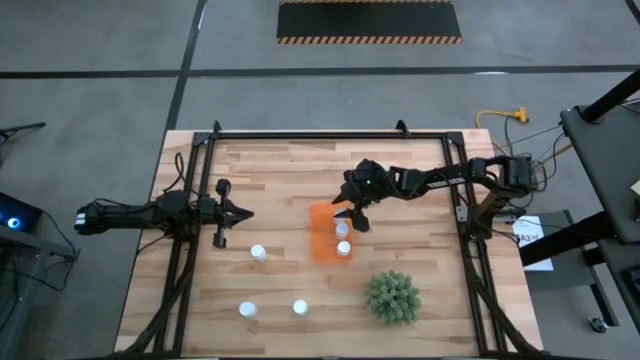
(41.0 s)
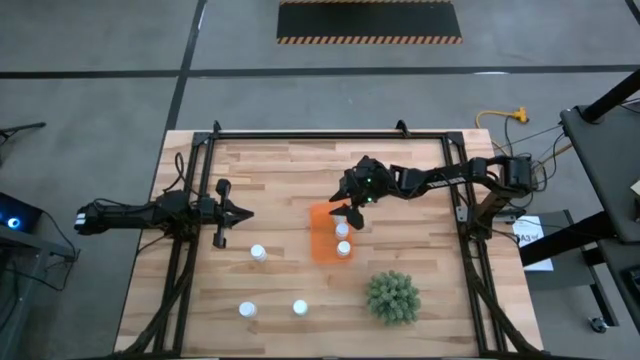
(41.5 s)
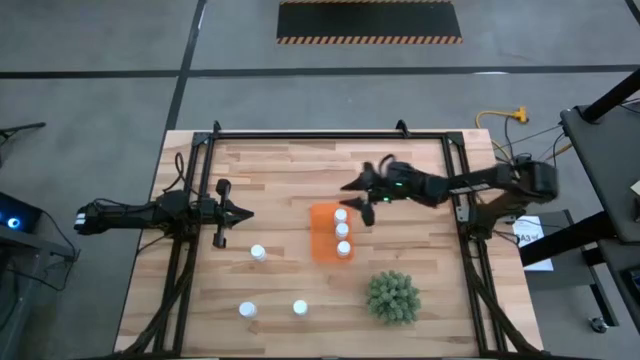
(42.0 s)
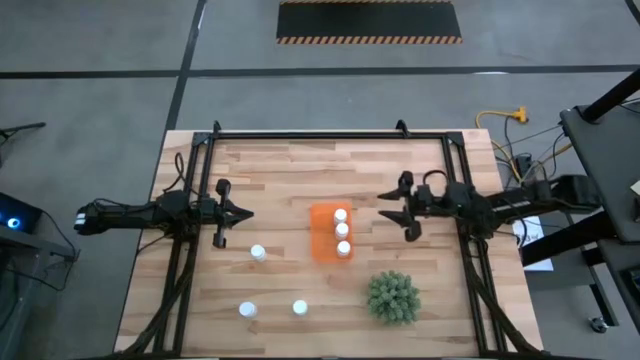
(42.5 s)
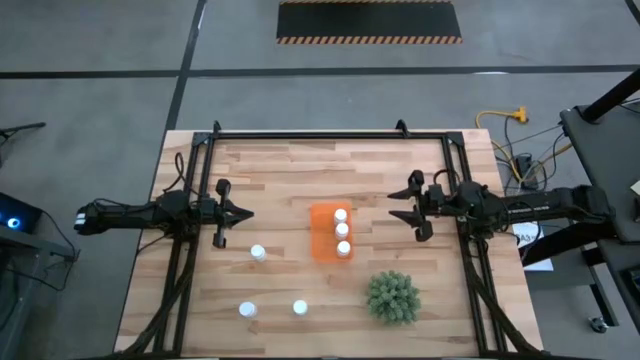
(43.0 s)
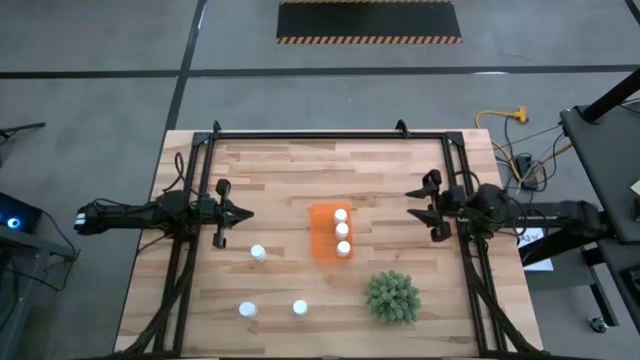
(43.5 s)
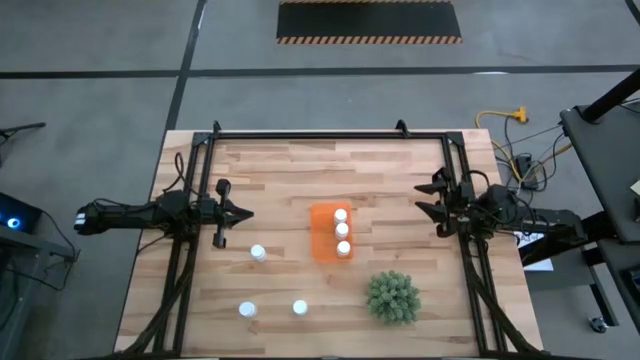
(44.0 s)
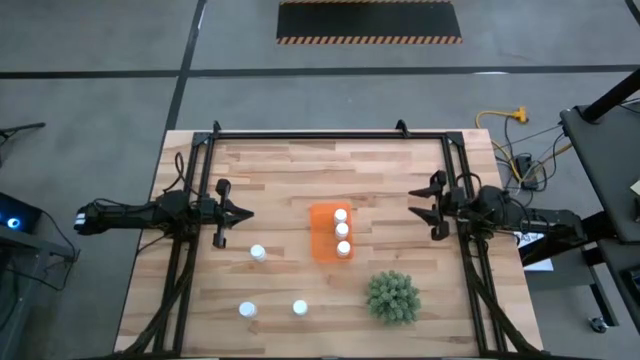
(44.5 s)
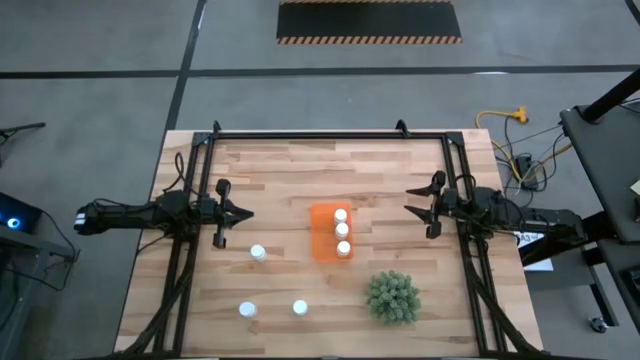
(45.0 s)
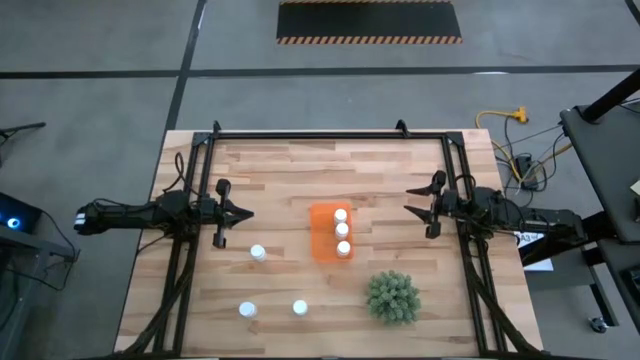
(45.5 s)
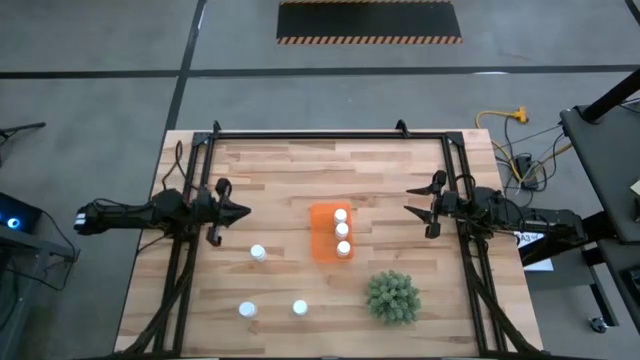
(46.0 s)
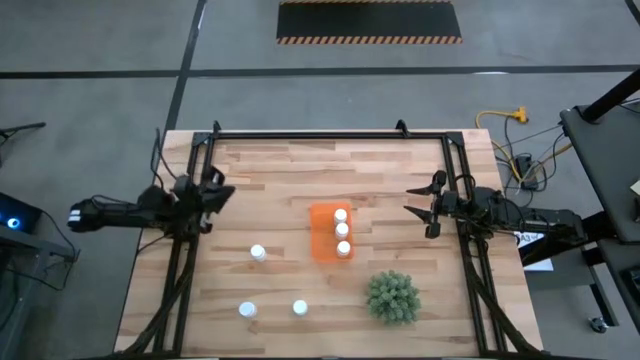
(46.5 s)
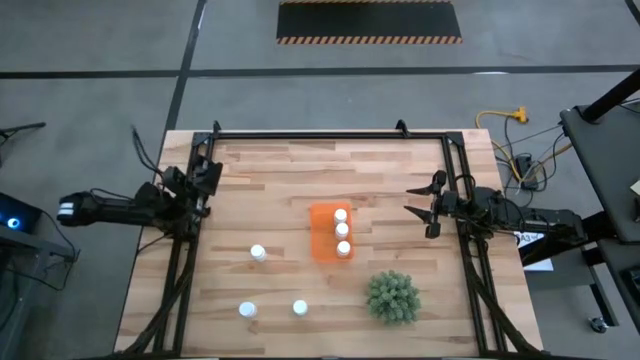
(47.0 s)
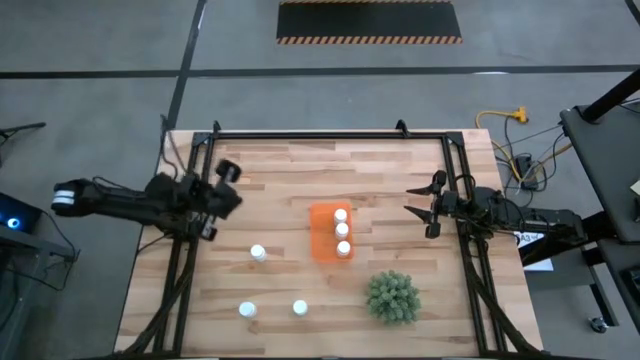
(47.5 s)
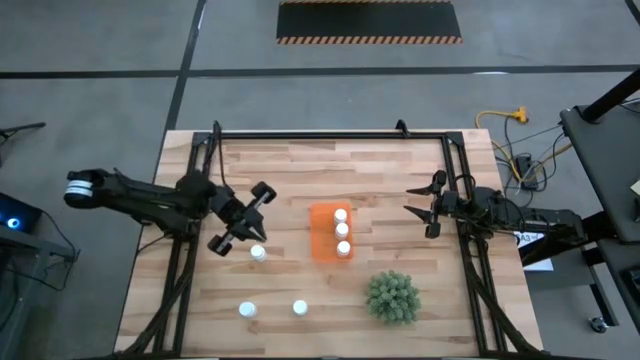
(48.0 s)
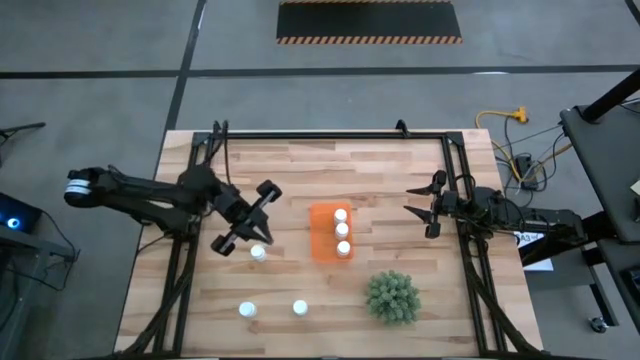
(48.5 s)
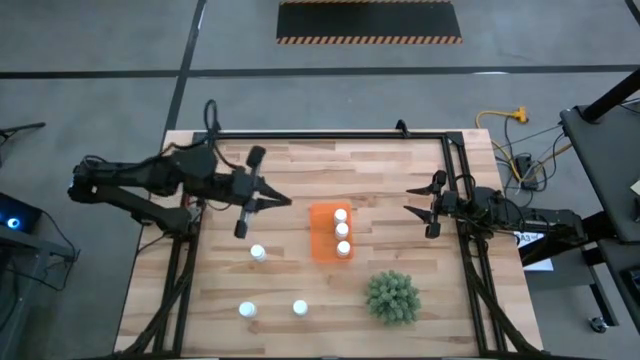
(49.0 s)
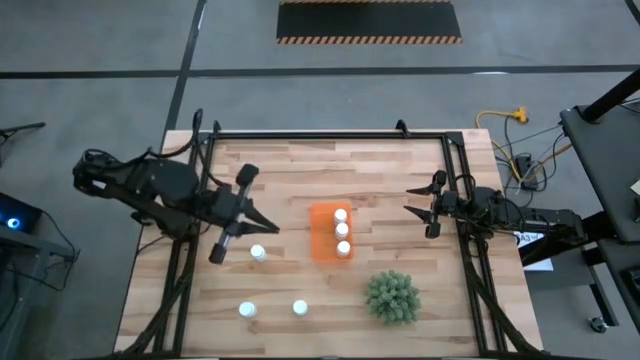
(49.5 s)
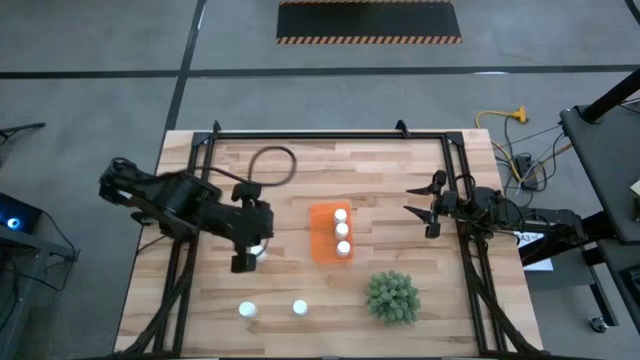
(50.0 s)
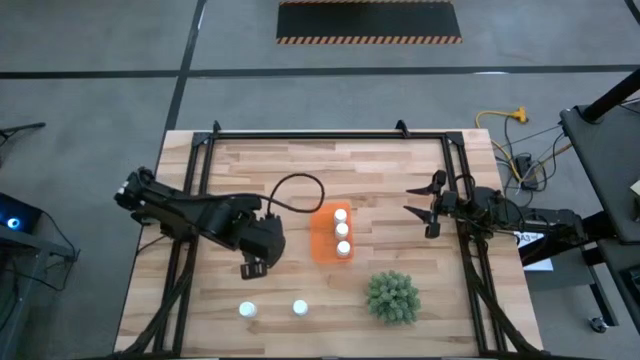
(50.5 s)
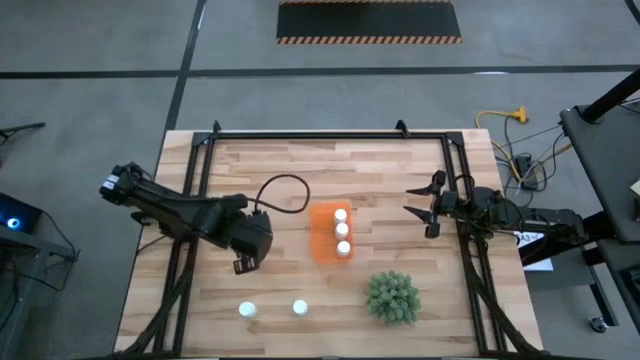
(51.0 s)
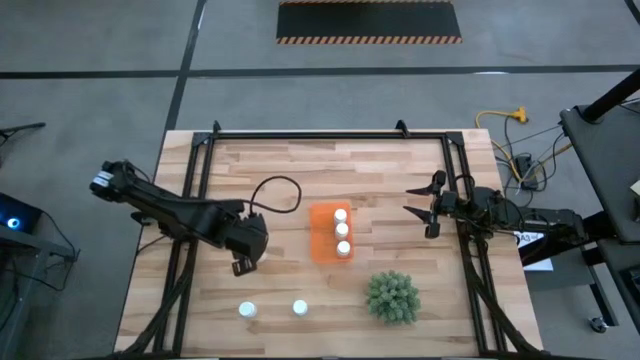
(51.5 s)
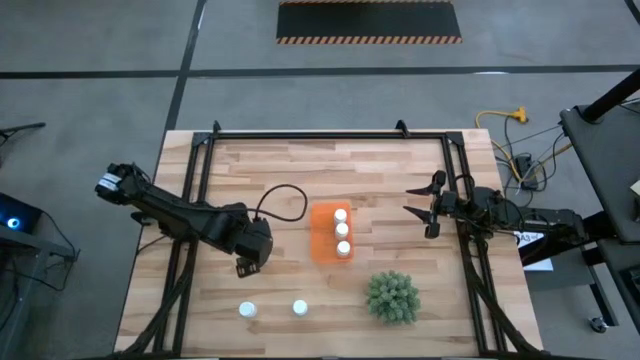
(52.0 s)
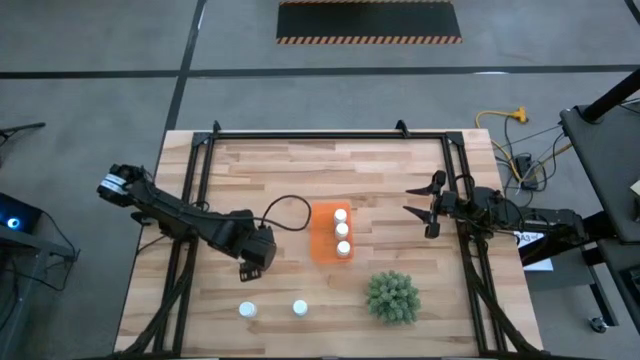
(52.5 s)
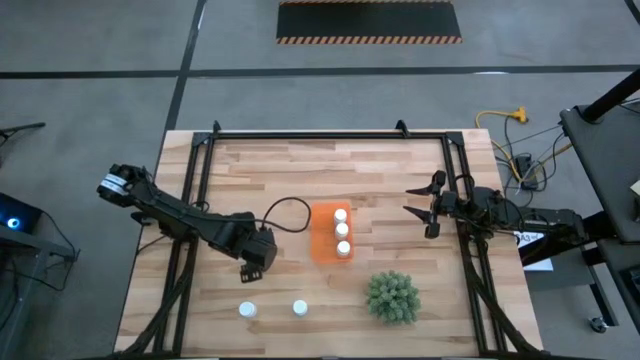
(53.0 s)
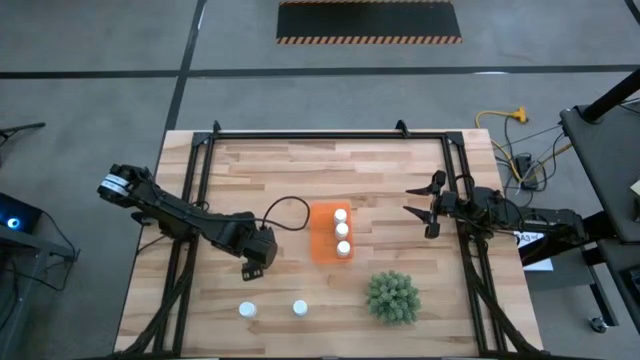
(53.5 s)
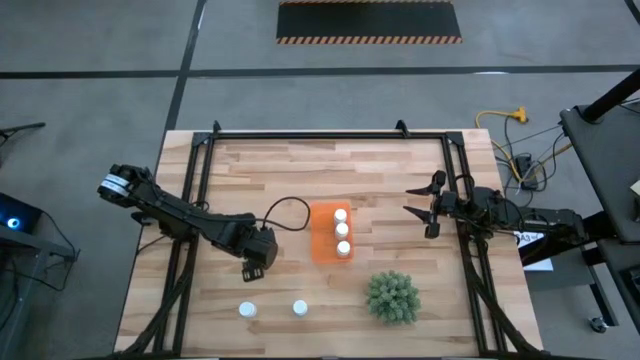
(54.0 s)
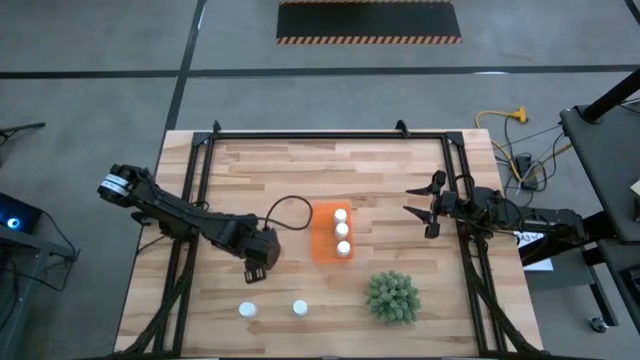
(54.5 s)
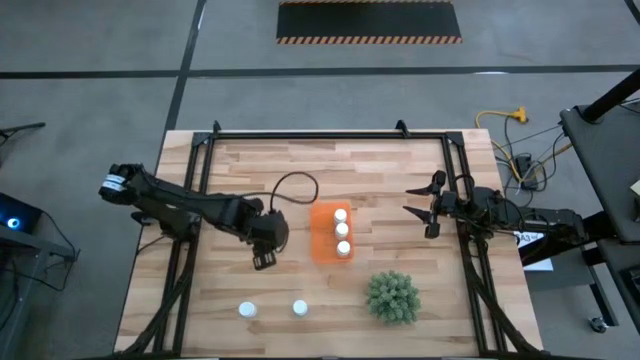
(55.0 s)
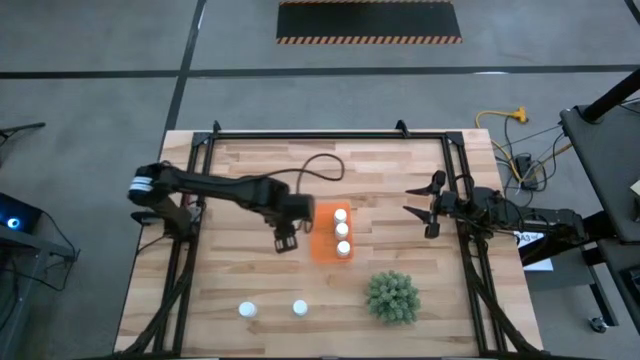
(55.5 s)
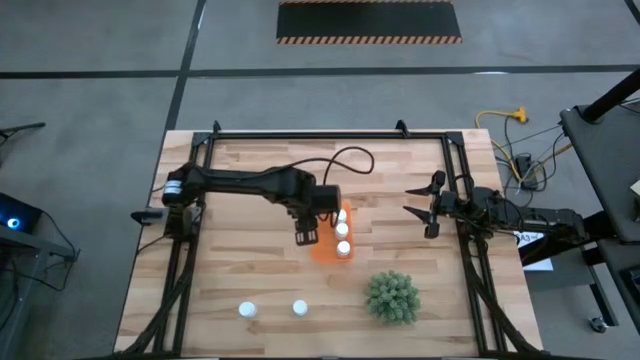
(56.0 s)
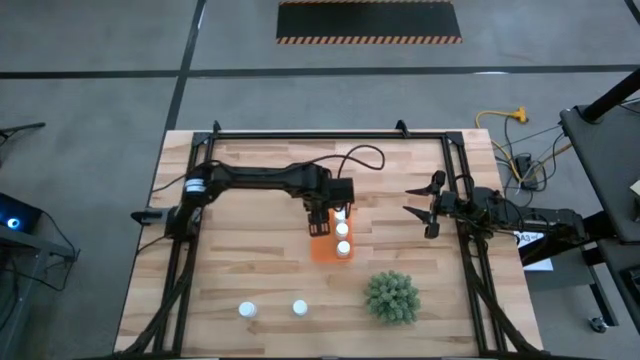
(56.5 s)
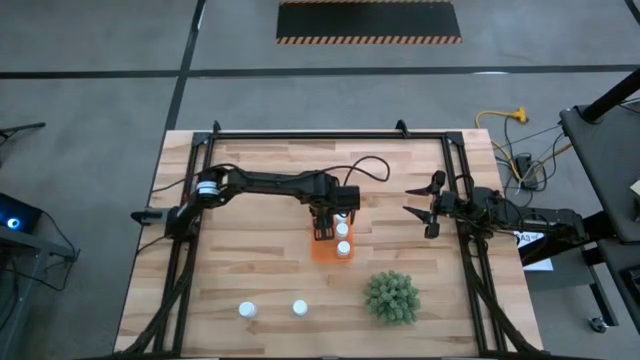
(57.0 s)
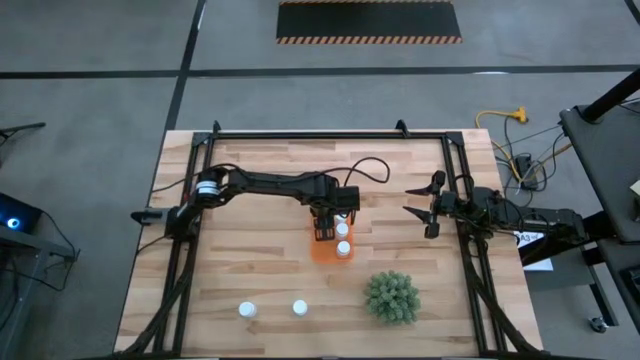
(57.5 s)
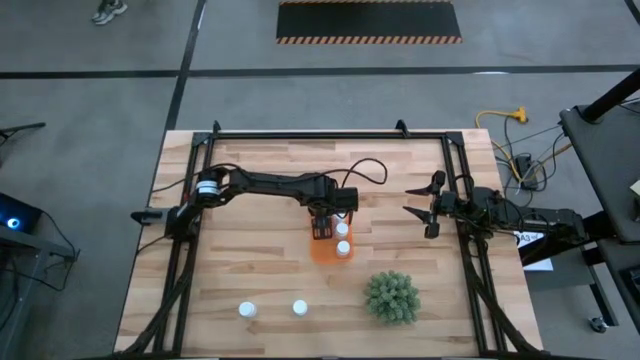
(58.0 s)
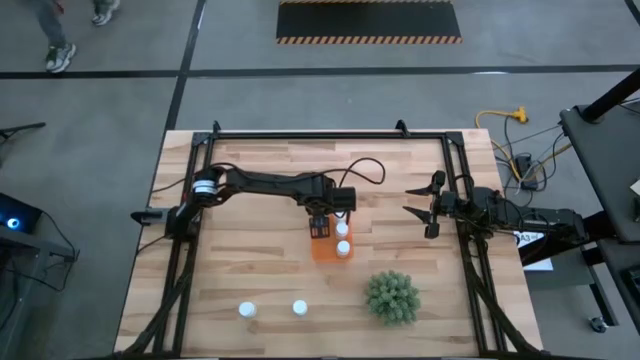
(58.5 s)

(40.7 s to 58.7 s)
Task: Pick and place pill bottles into a basket
Put the white pill bottle into the orange bin

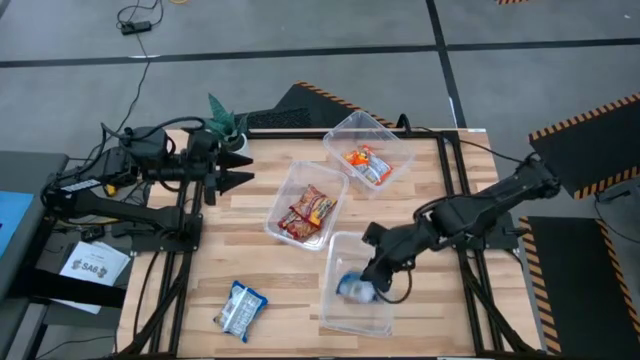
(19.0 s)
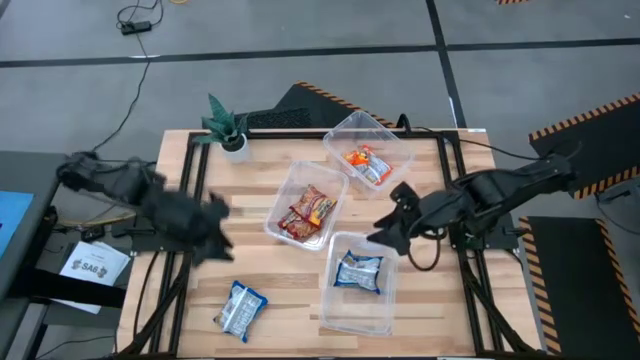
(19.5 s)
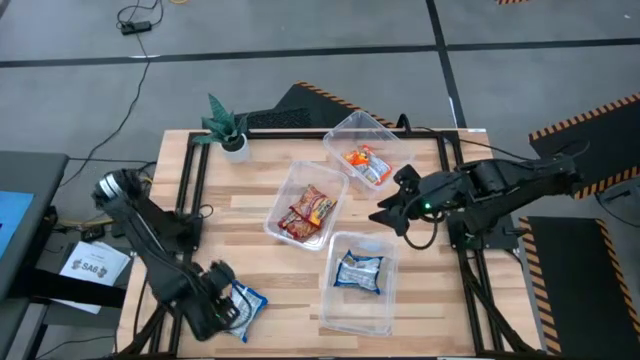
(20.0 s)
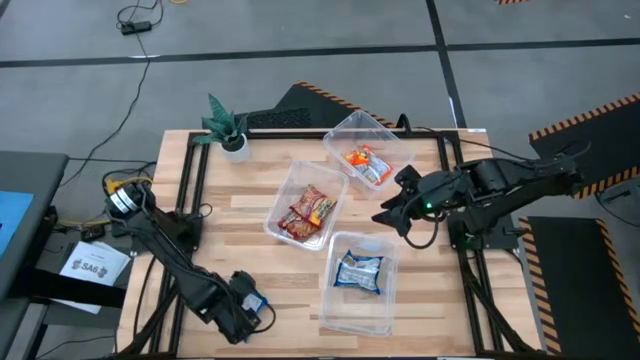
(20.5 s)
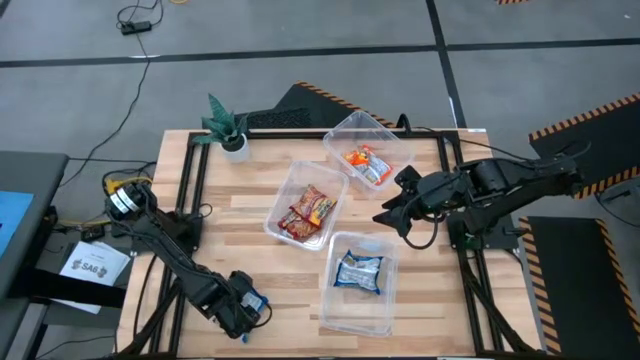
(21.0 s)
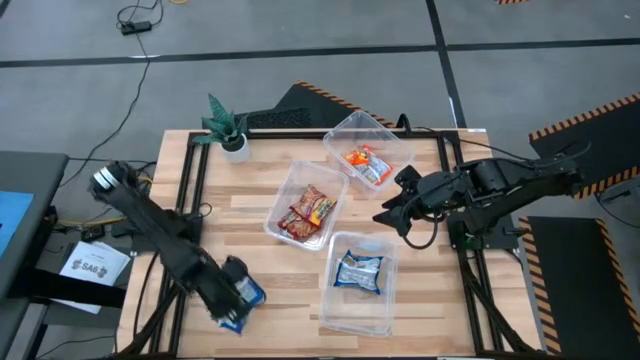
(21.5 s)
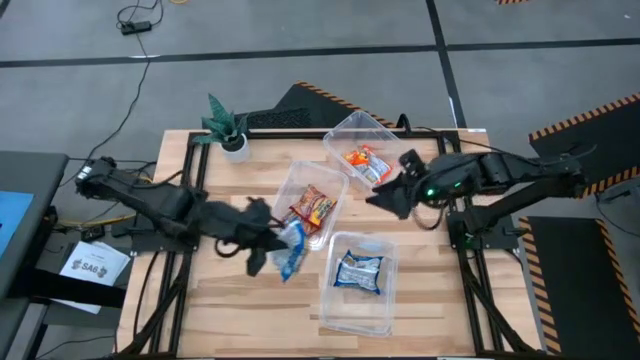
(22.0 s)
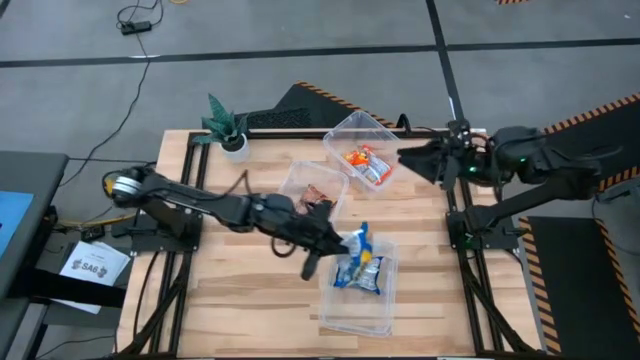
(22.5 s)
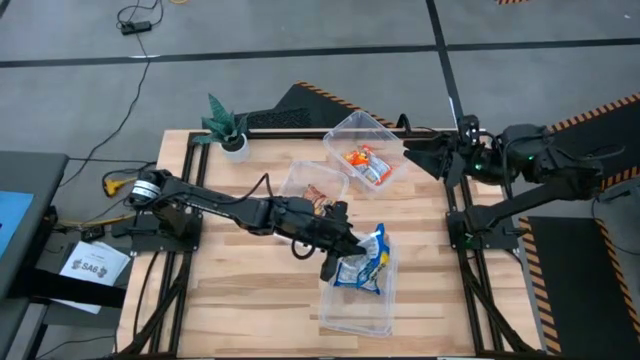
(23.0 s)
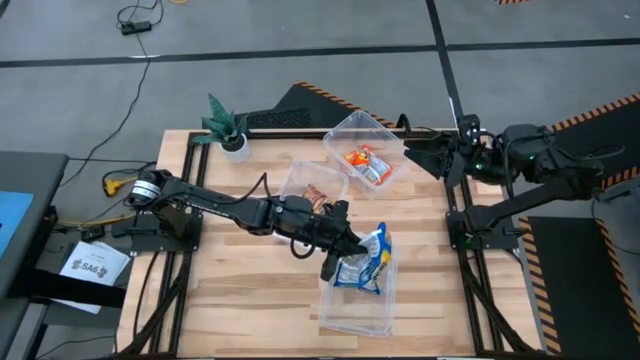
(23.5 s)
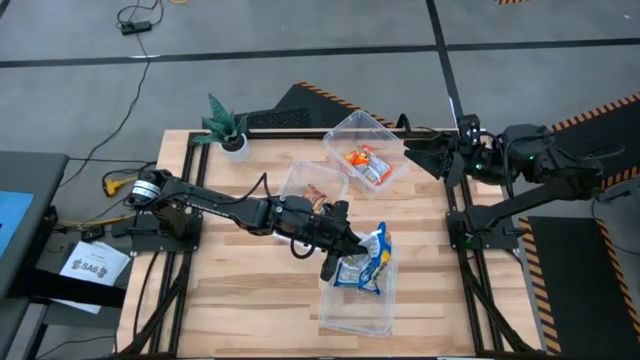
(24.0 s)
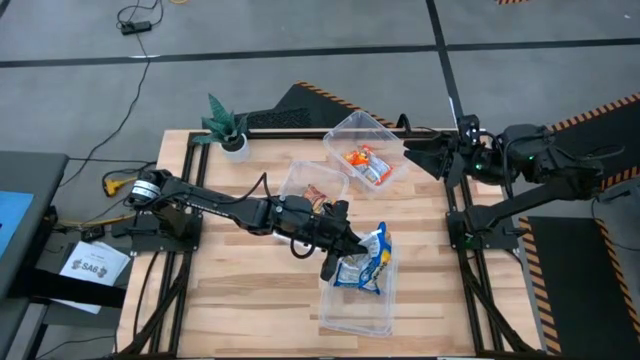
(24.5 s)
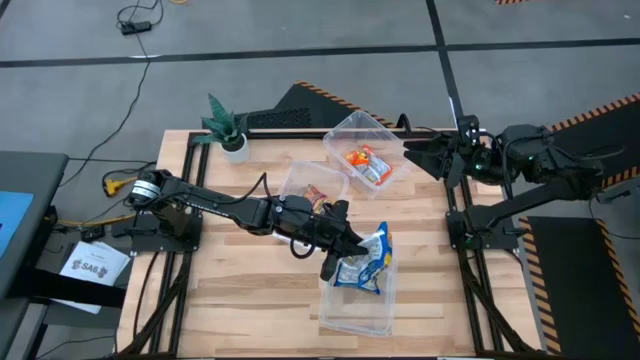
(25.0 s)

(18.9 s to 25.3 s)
Task: Sort Maruchan noodles
Put the blue noodle pack into the bottom transparent bin
